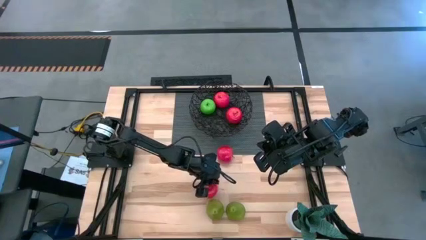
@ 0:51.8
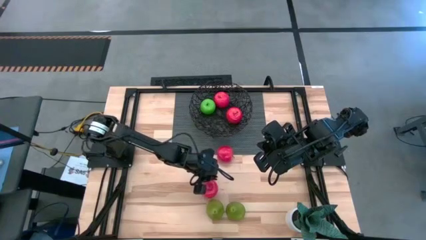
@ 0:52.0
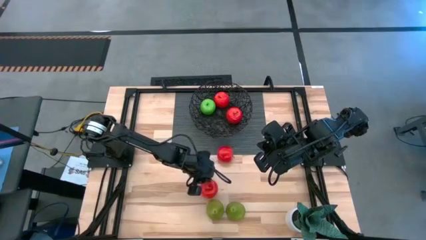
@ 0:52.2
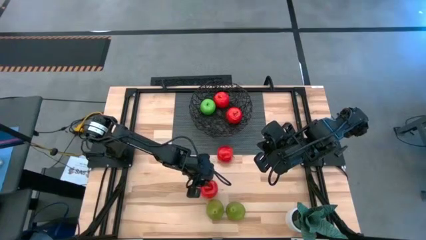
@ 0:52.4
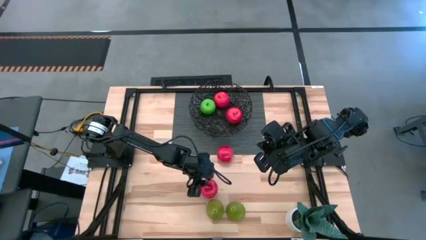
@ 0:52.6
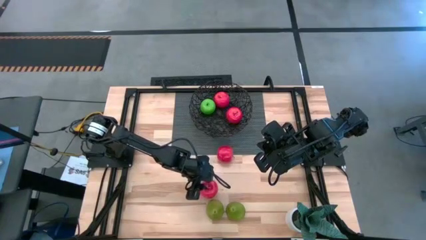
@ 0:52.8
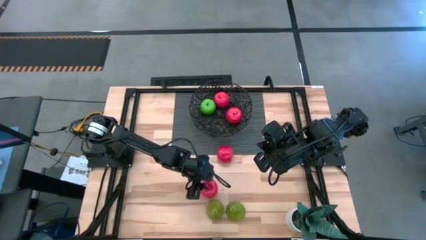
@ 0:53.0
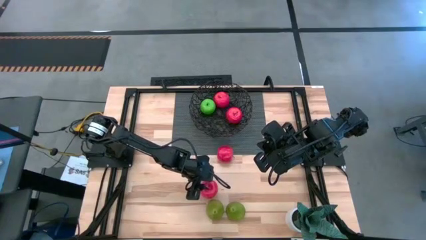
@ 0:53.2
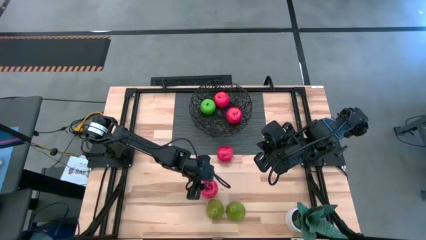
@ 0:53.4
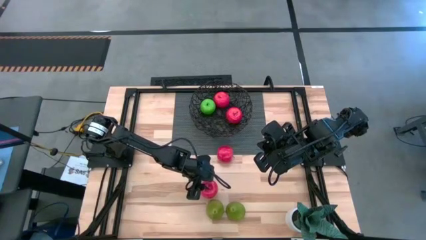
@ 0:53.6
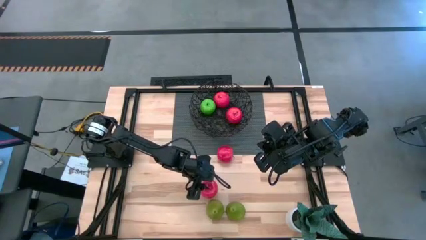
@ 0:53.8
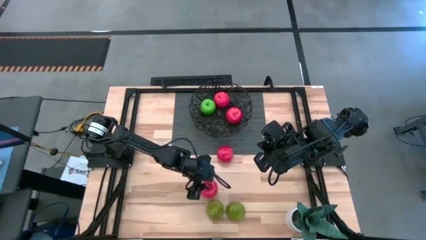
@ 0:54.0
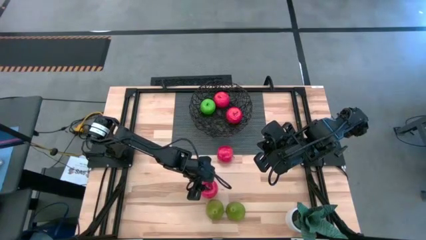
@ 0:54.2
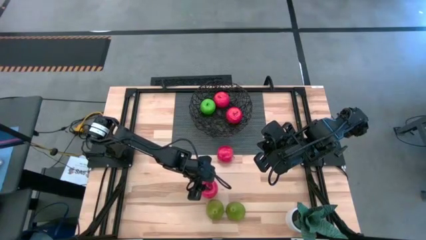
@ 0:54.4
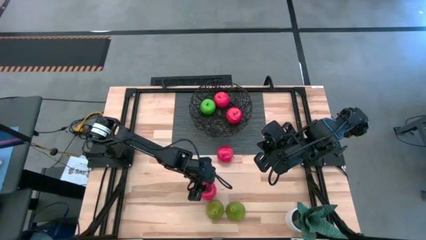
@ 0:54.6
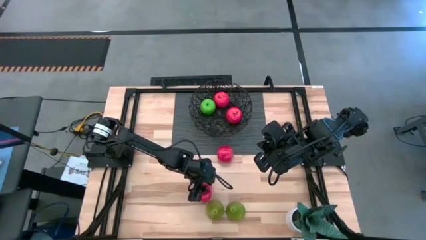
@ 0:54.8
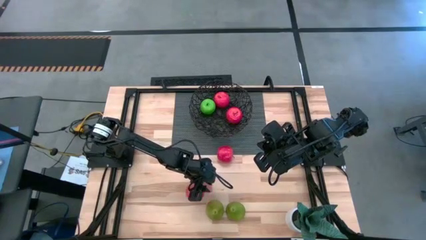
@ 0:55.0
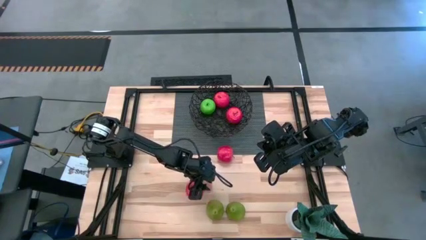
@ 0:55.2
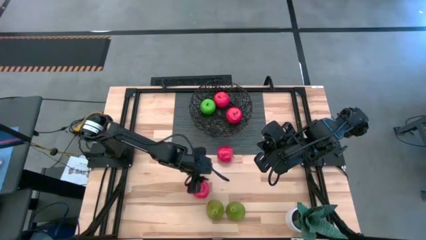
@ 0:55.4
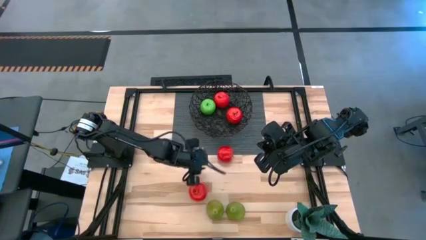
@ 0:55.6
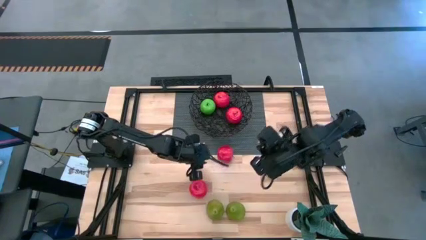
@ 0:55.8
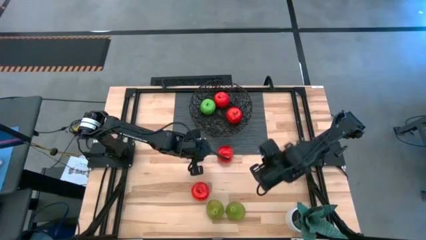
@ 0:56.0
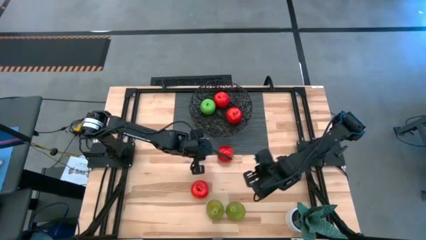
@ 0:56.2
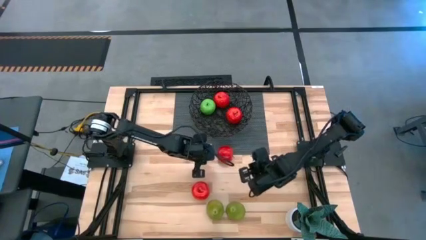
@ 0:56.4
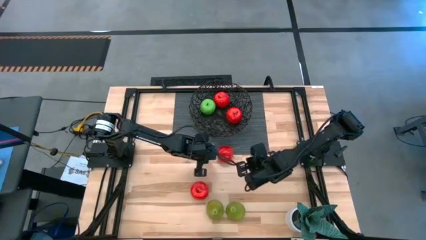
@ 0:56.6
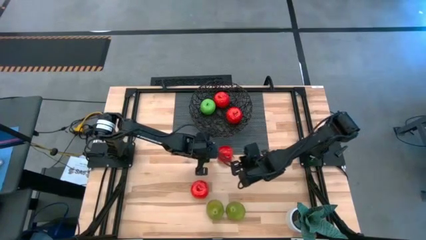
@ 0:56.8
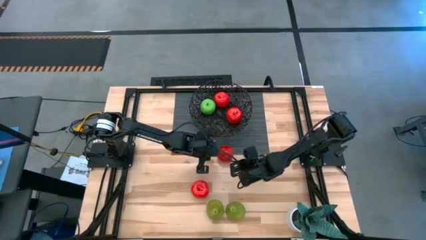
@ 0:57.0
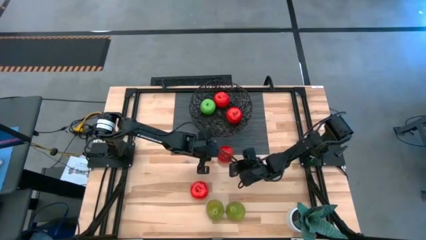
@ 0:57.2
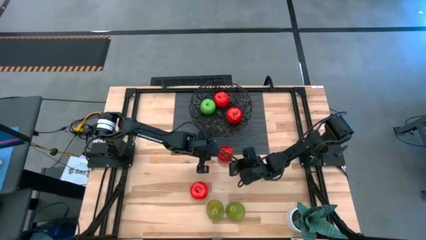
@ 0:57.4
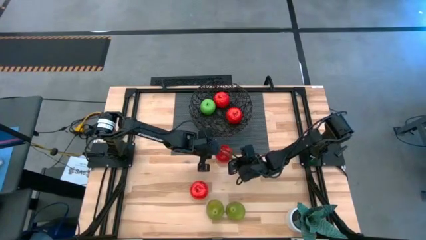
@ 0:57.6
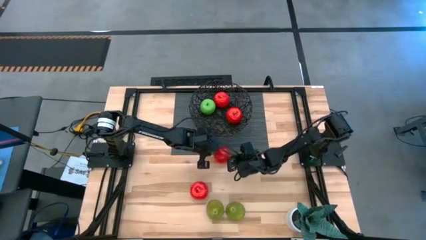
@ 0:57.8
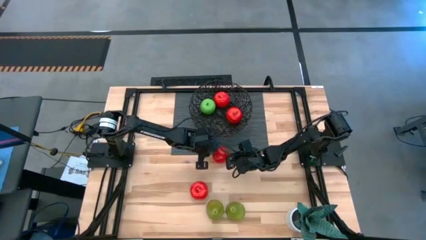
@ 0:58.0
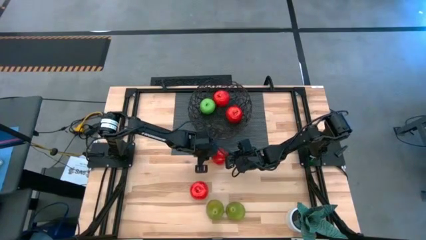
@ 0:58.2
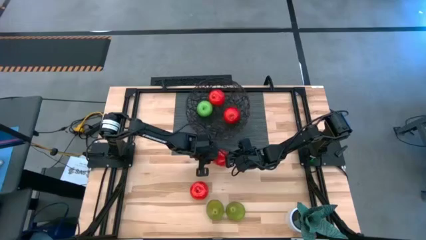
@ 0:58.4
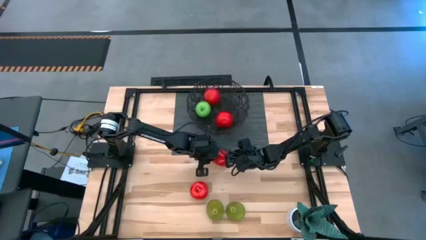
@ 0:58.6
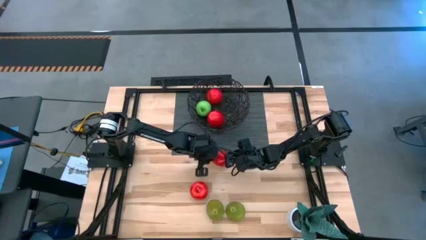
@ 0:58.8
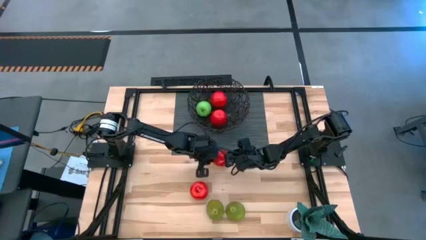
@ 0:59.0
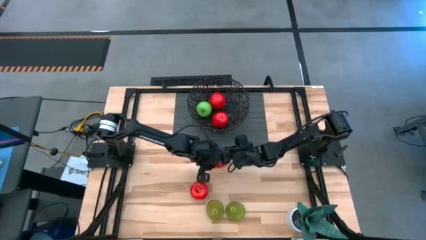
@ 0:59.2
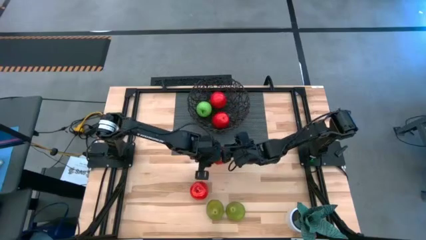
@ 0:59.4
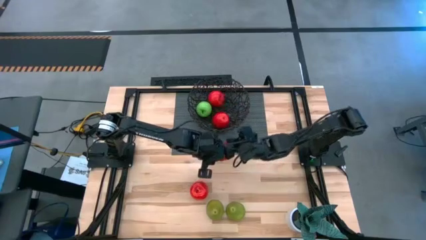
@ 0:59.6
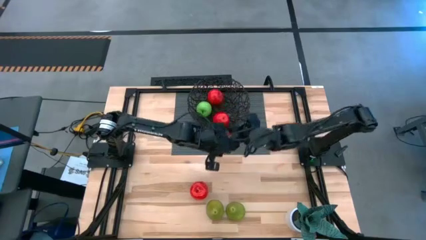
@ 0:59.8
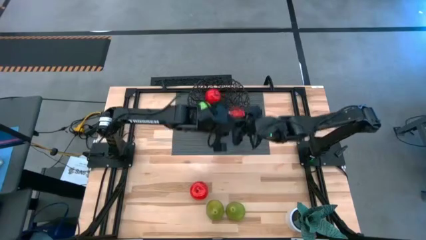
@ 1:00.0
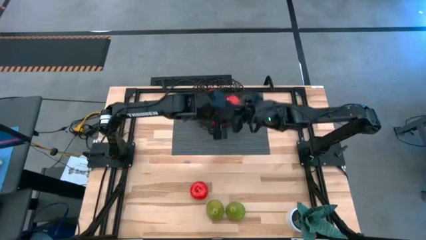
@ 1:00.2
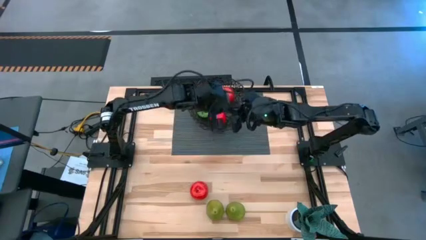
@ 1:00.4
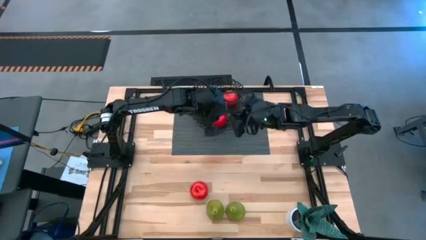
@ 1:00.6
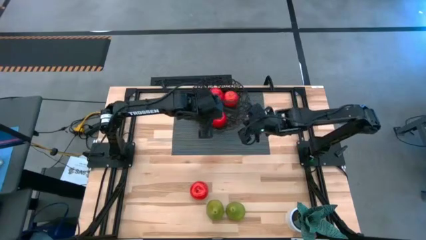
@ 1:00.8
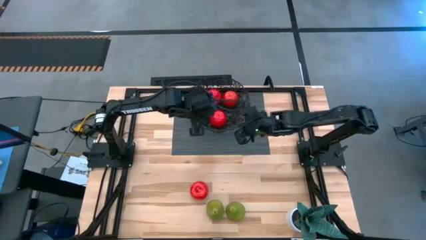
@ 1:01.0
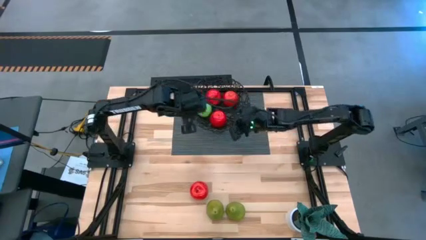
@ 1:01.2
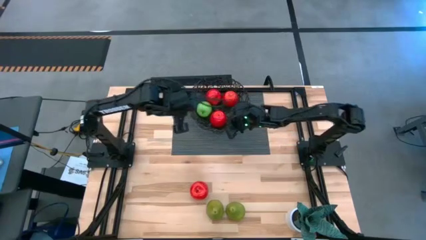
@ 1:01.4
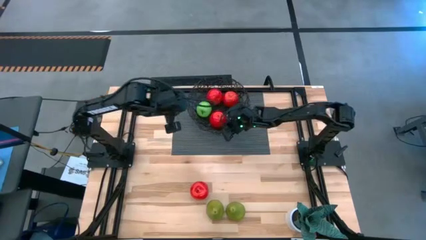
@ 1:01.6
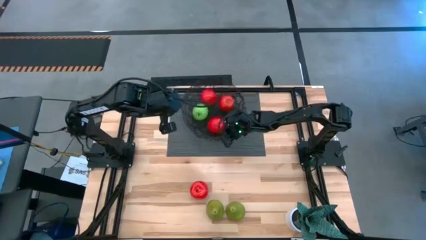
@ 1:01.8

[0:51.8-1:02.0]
Task: Build produce basket
Put the red apple into the black basket

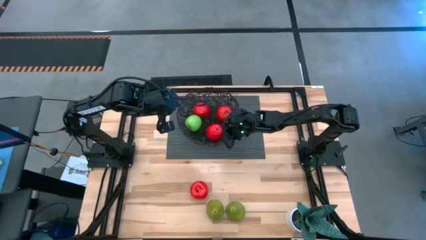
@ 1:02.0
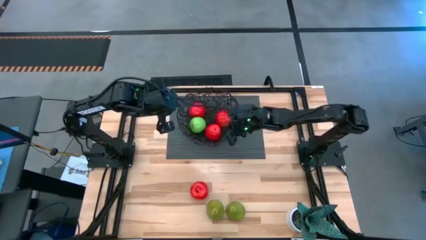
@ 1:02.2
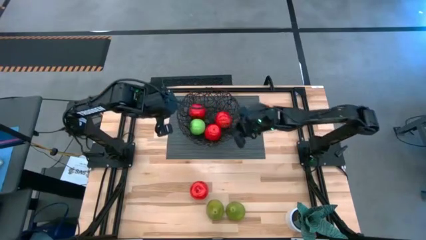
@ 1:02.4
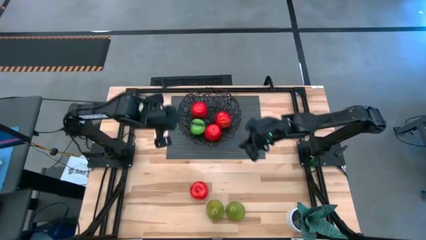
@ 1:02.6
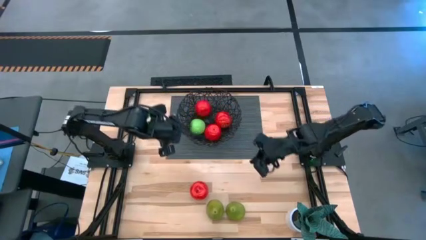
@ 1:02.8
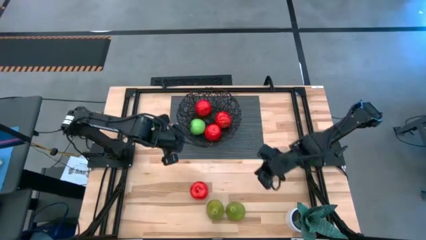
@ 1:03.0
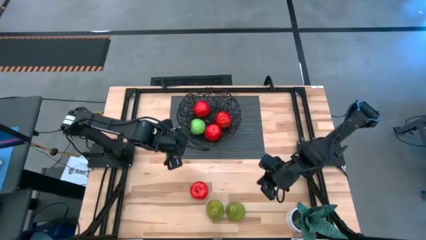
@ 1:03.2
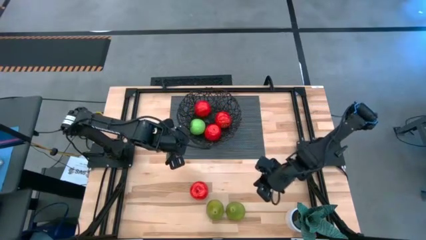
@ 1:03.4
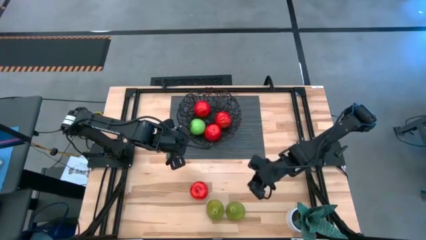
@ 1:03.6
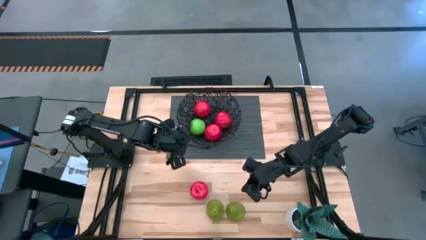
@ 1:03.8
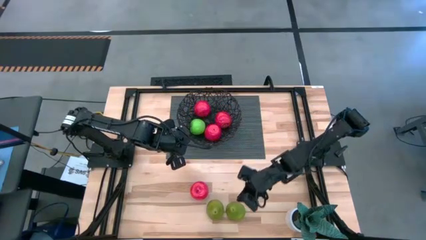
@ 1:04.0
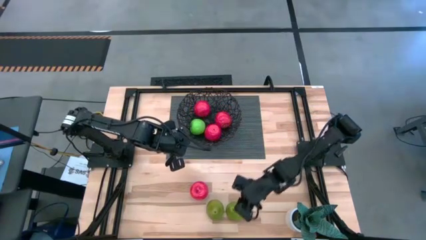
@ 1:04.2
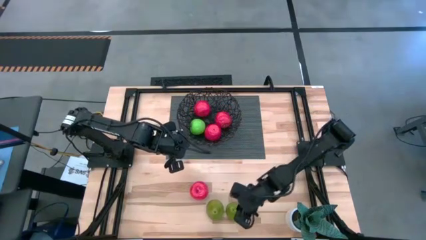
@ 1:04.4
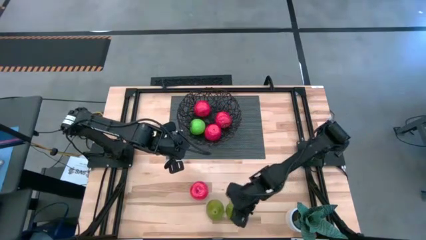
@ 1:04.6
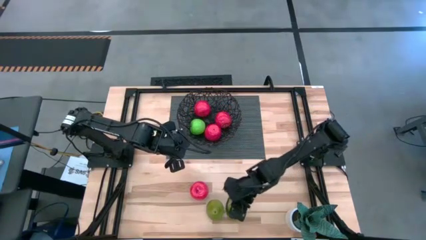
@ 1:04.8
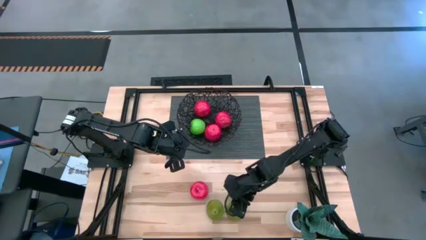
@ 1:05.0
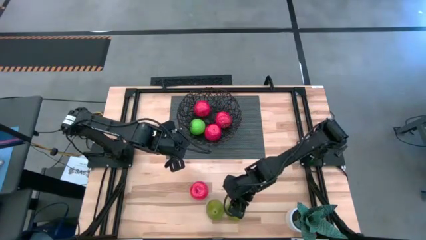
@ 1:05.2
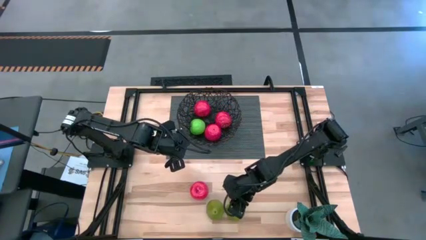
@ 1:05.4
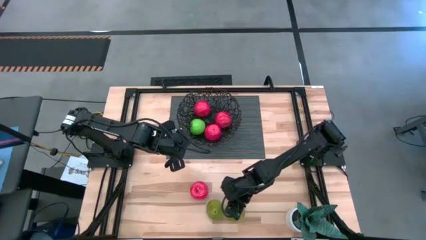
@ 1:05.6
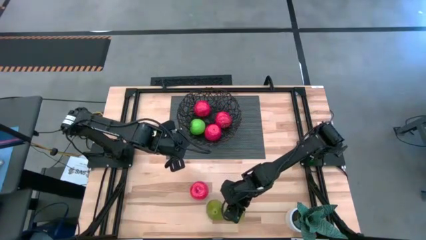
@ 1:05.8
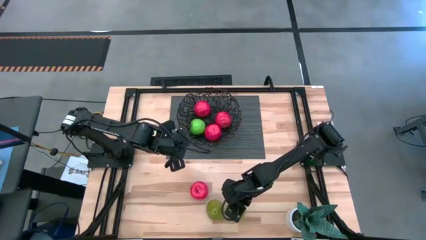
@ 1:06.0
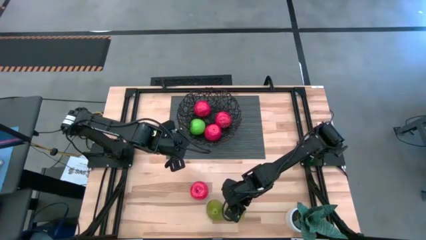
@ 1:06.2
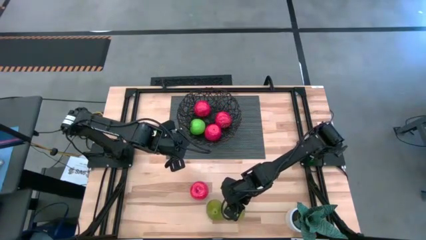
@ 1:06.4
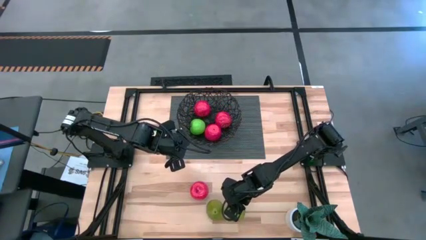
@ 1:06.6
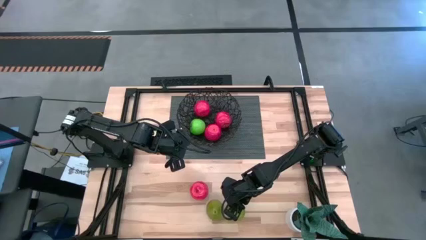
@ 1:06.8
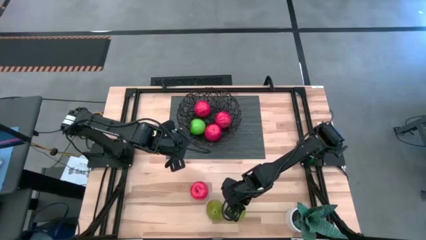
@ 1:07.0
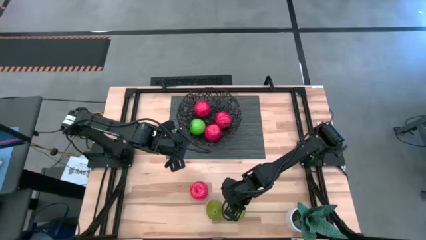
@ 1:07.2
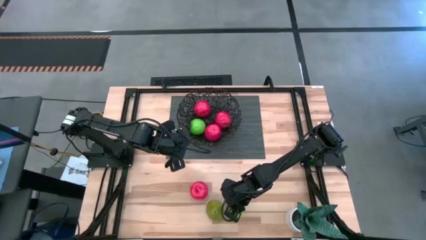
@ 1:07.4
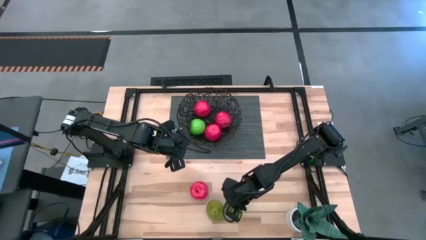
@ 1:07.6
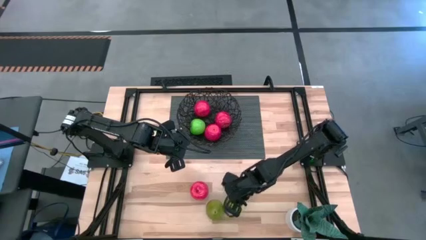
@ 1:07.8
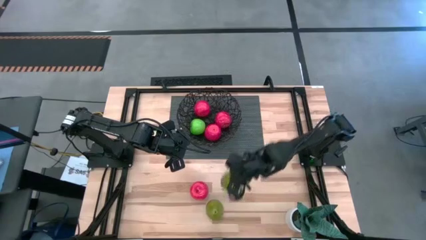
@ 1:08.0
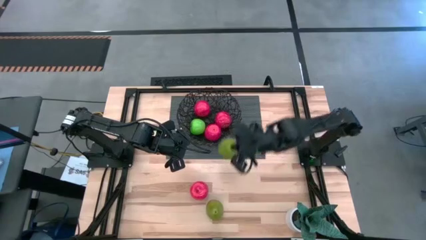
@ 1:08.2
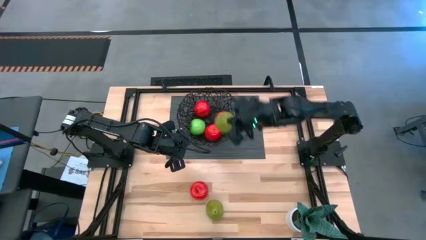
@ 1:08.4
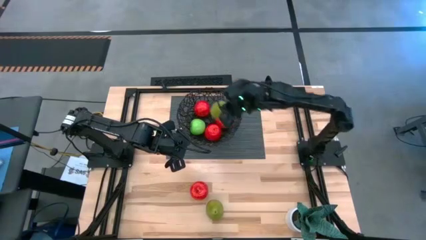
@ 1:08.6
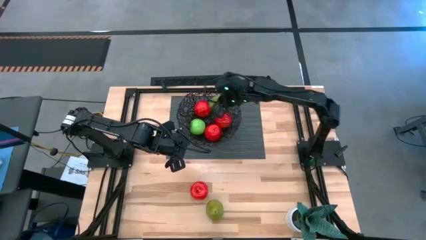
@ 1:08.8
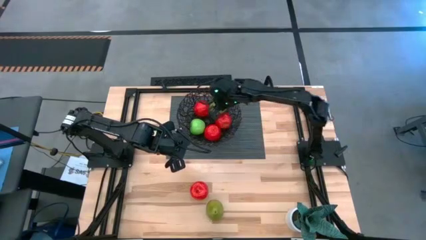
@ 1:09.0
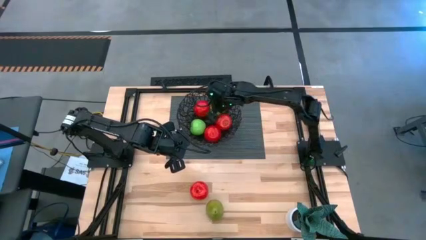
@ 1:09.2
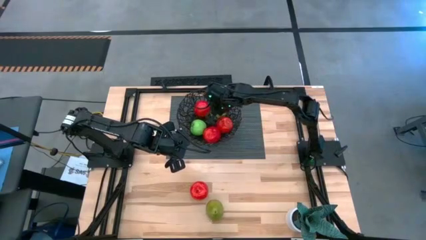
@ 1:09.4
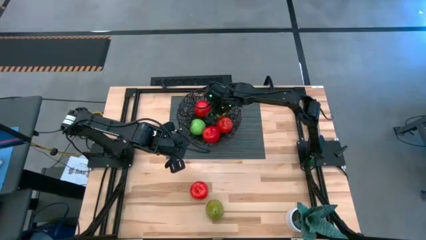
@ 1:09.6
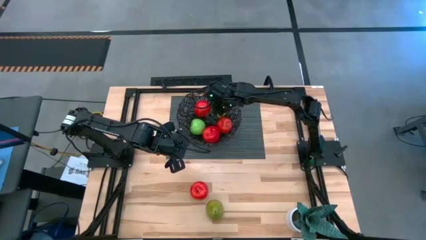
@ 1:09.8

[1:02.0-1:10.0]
Put the green pear into the black basket
